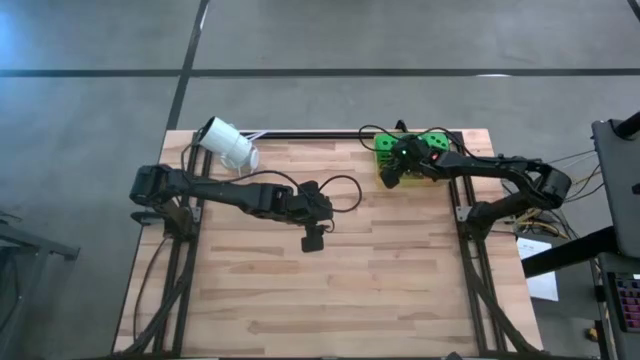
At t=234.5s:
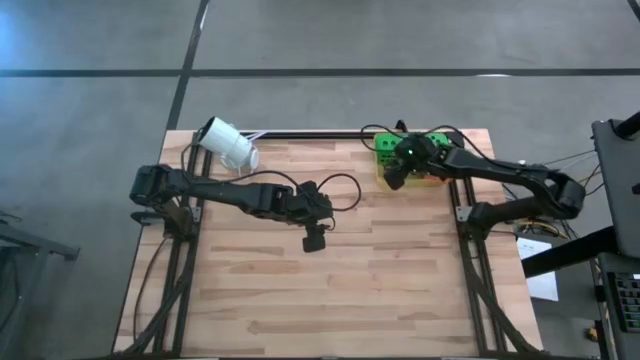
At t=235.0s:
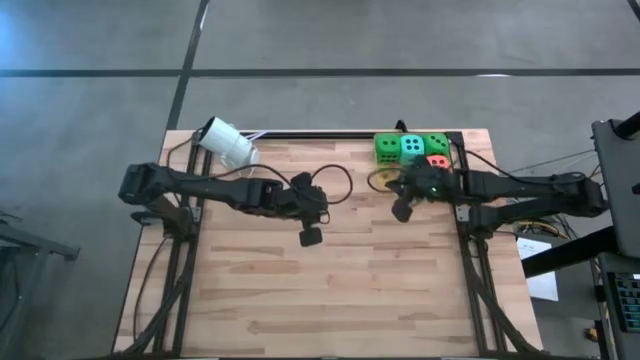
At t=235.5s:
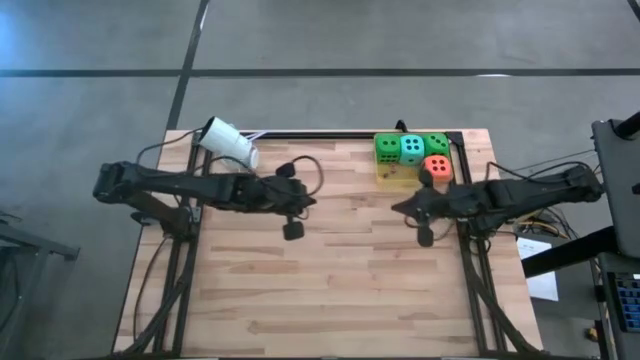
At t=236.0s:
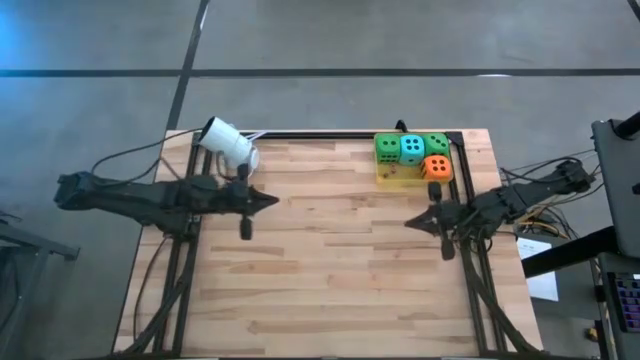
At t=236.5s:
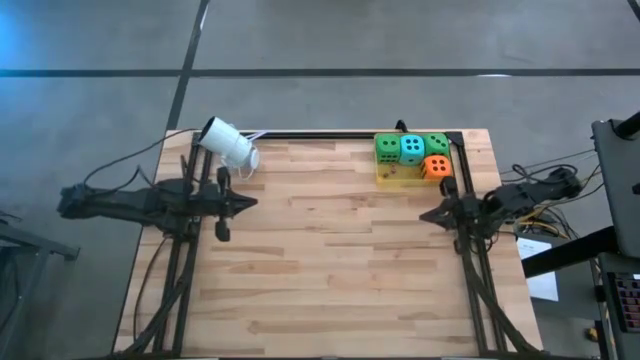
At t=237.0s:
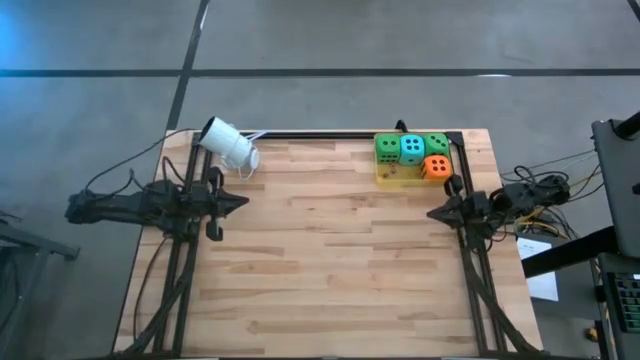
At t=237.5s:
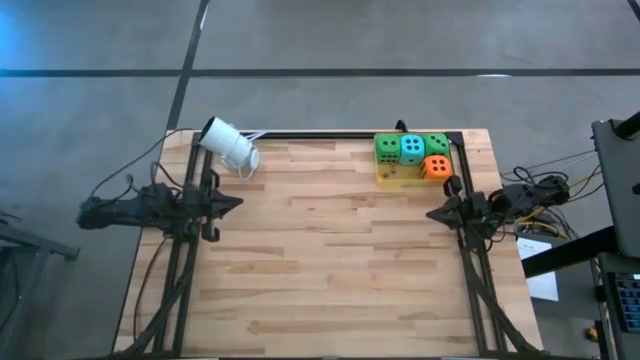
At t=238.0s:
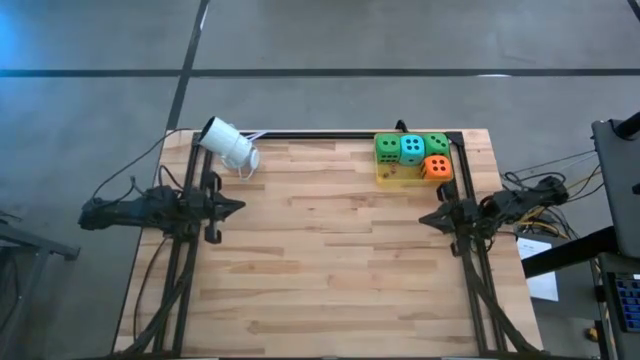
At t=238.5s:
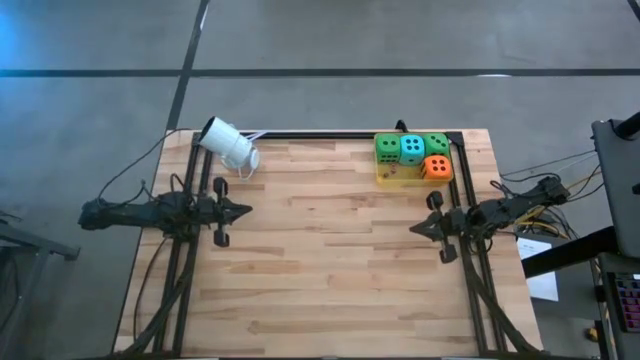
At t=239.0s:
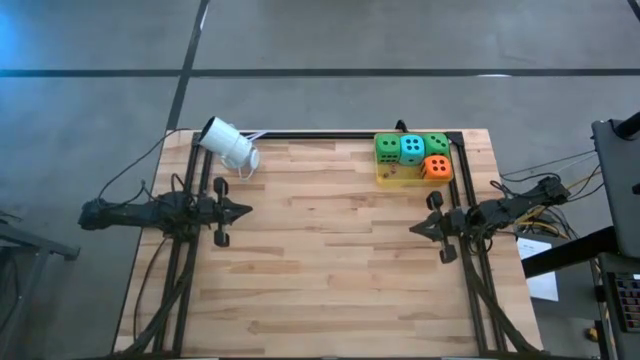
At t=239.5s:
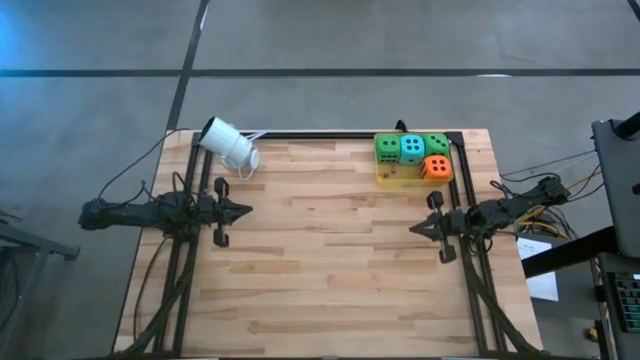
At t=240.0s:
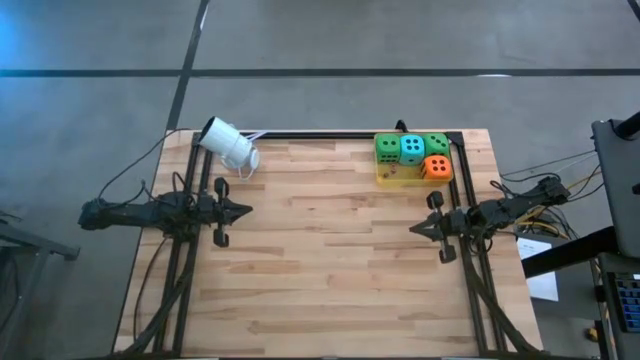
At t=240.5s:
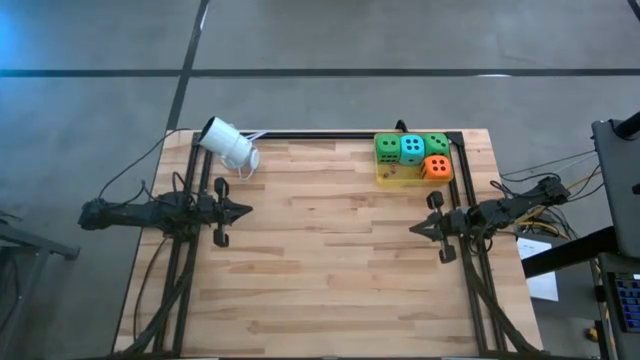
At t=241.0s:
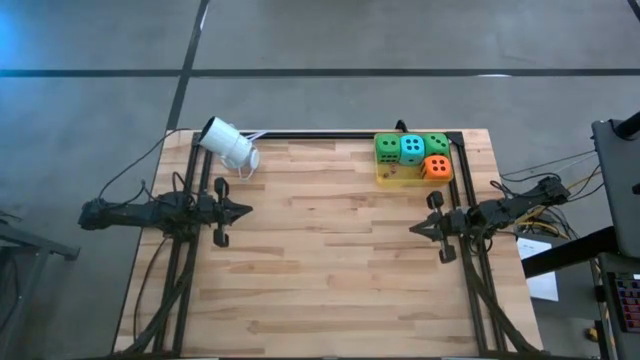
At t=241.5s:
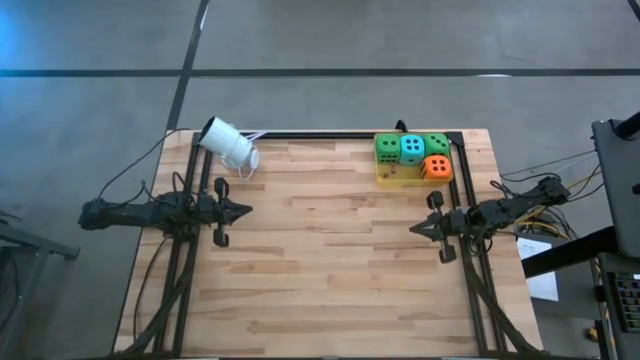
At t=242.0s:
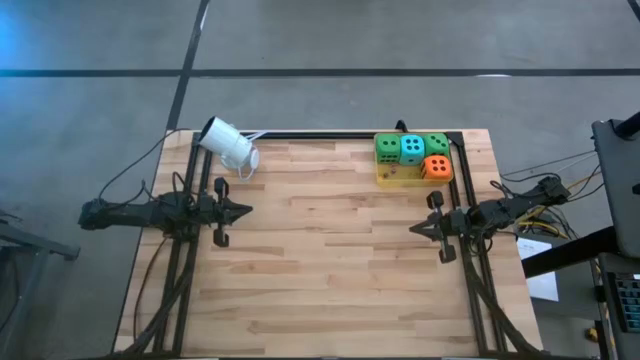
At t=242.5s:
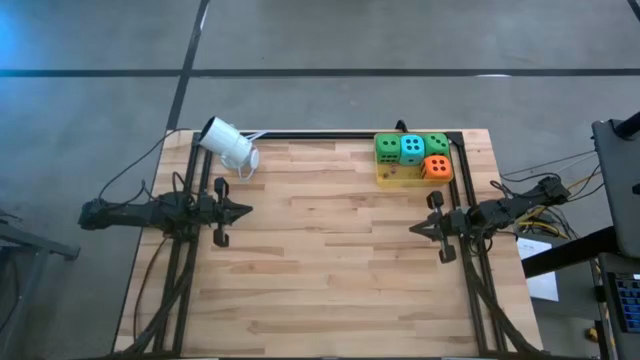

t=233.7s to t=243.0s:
Task: Pick & Place Dice
Return to Home Position

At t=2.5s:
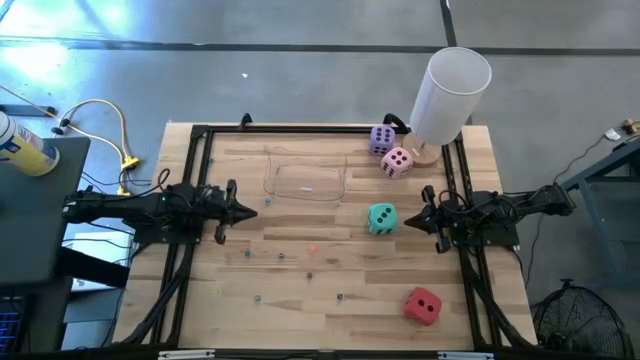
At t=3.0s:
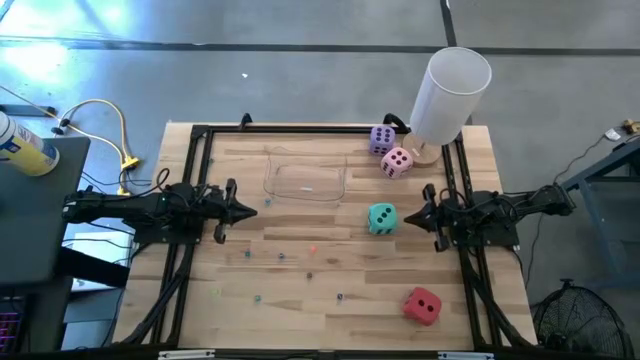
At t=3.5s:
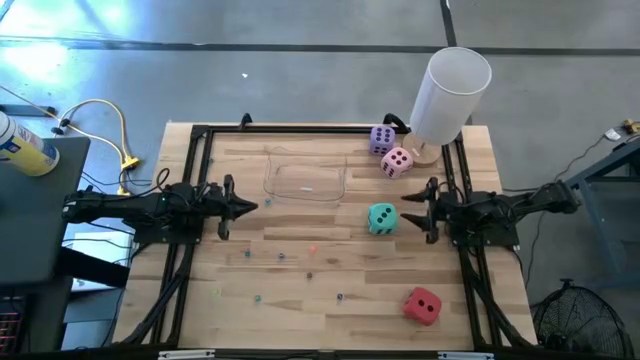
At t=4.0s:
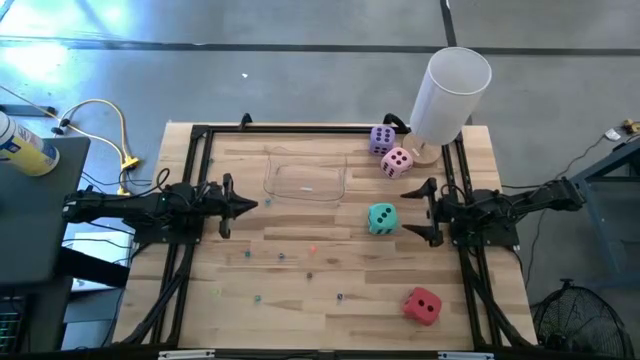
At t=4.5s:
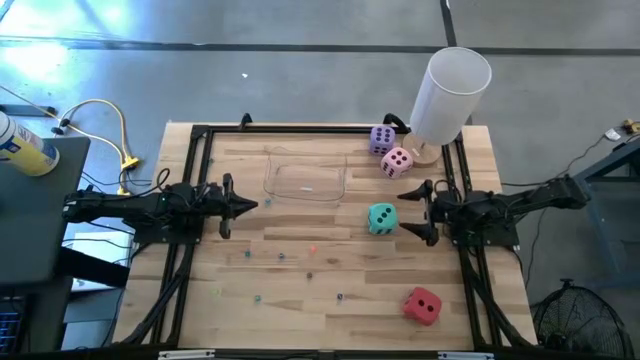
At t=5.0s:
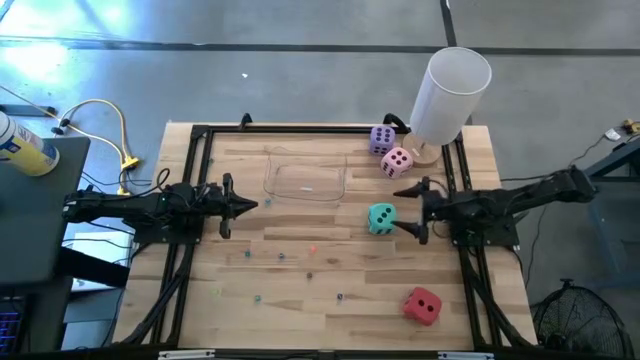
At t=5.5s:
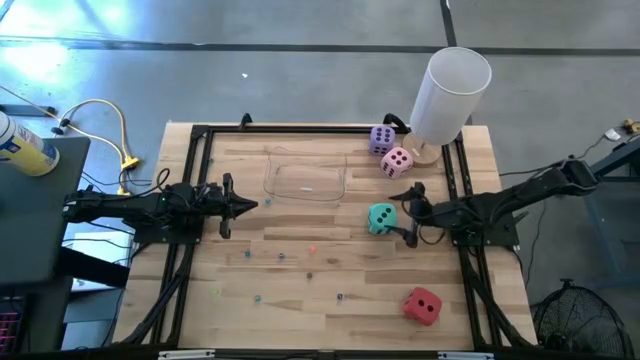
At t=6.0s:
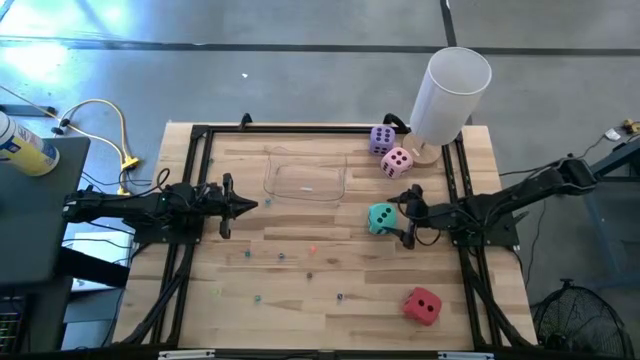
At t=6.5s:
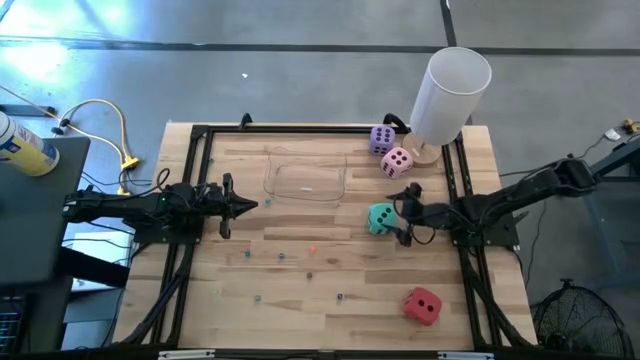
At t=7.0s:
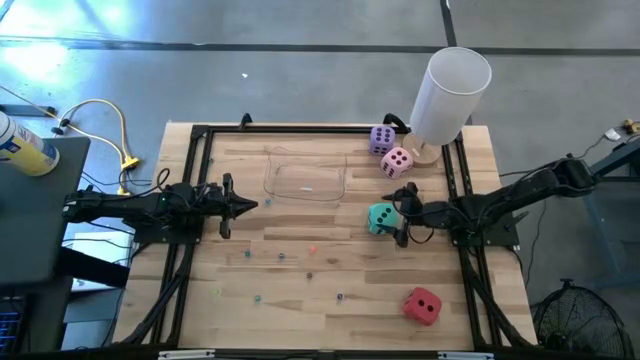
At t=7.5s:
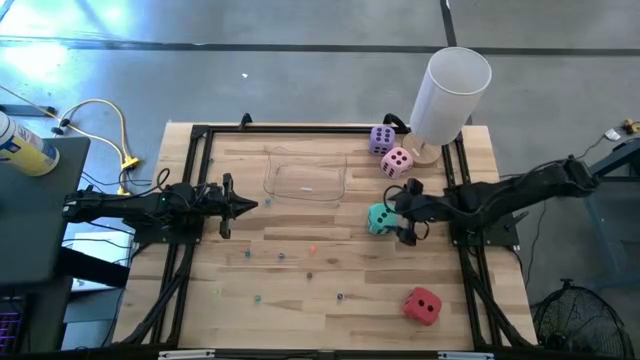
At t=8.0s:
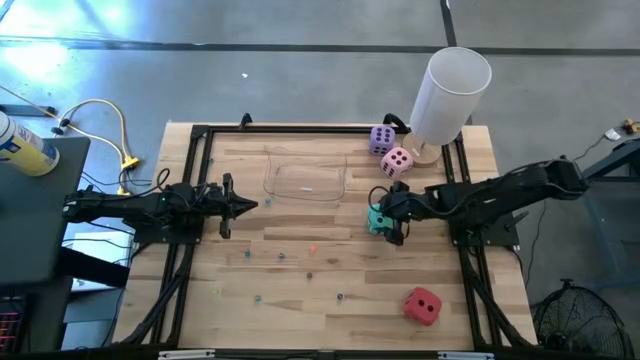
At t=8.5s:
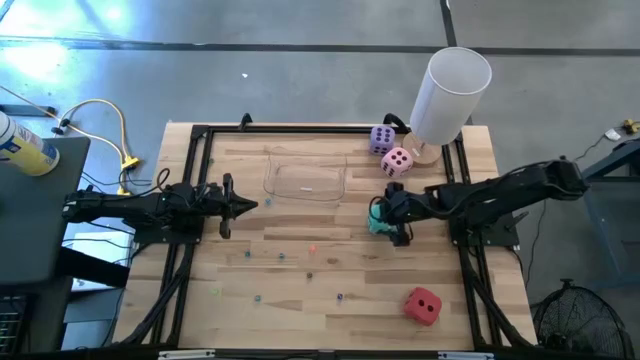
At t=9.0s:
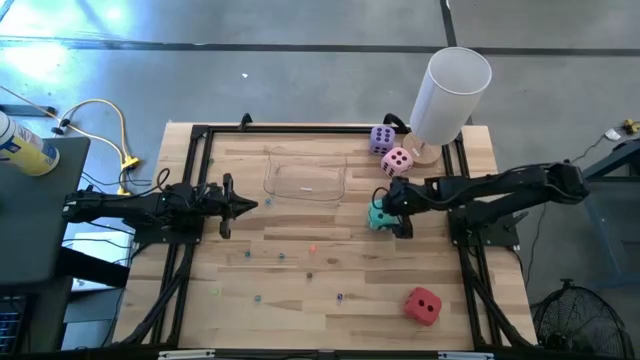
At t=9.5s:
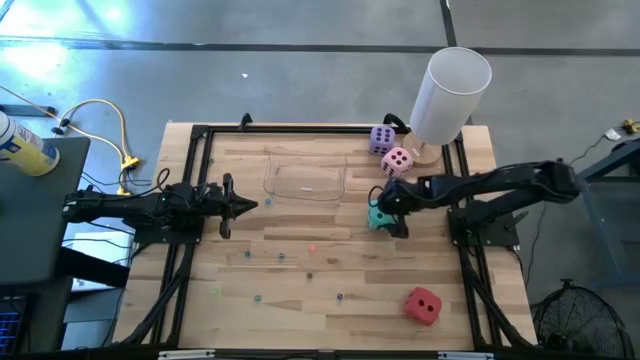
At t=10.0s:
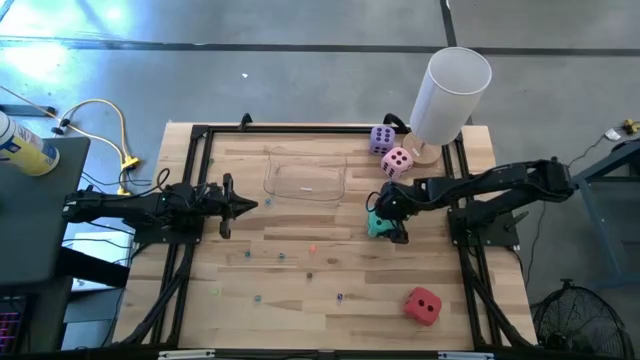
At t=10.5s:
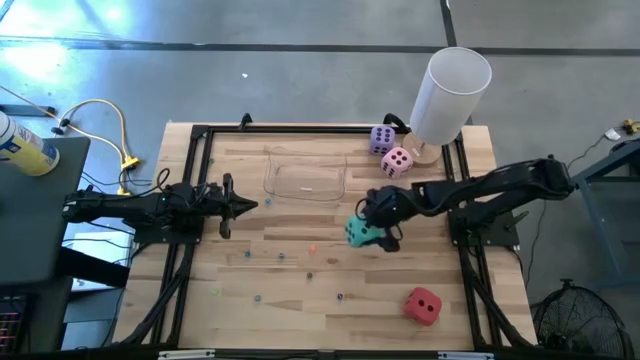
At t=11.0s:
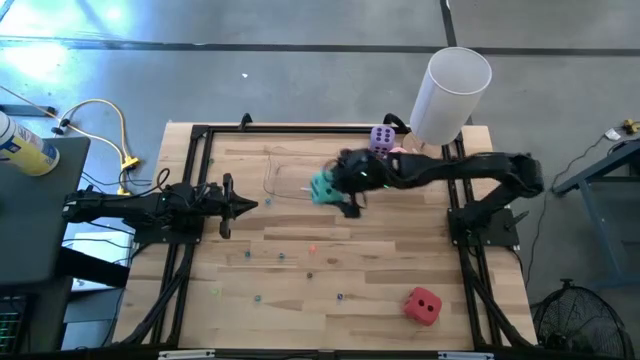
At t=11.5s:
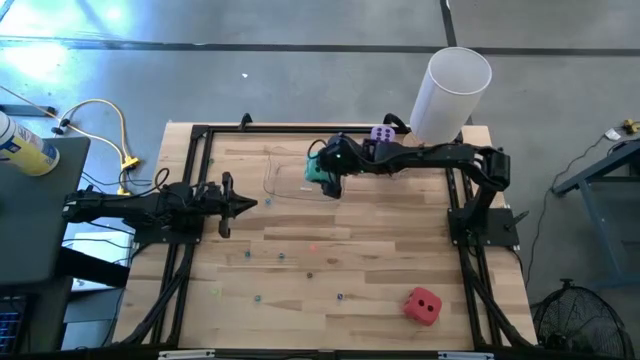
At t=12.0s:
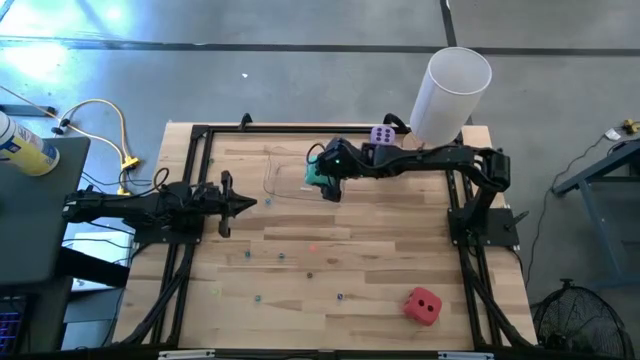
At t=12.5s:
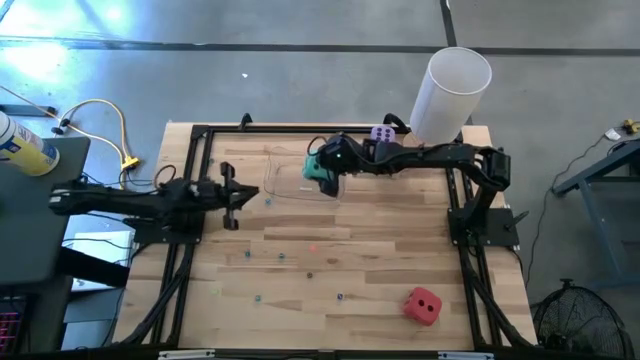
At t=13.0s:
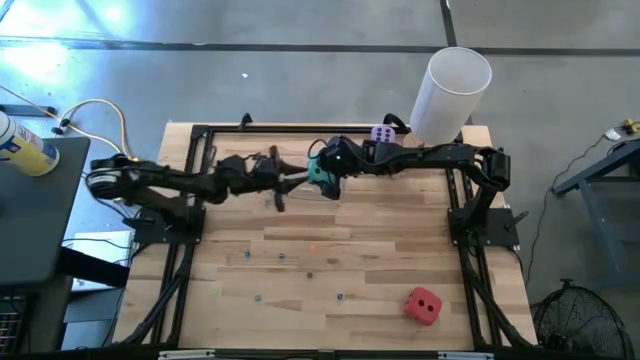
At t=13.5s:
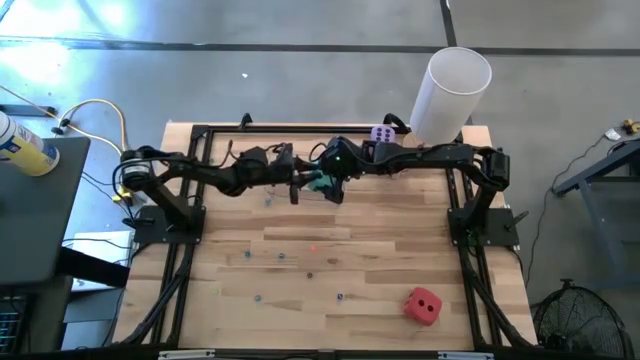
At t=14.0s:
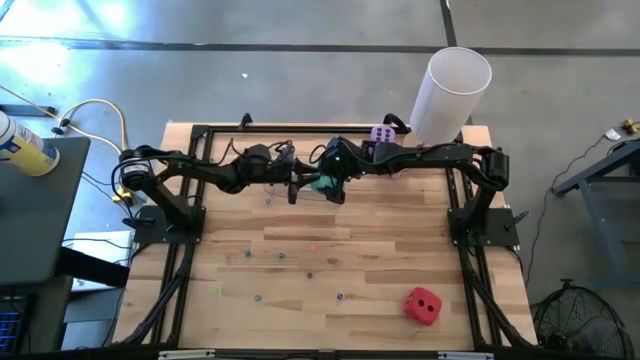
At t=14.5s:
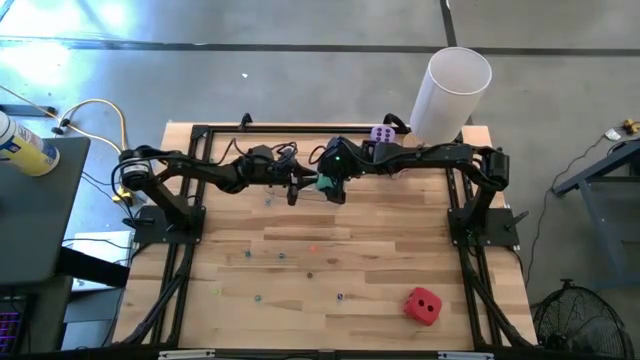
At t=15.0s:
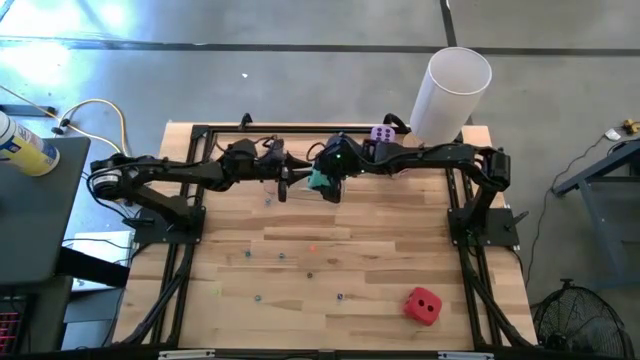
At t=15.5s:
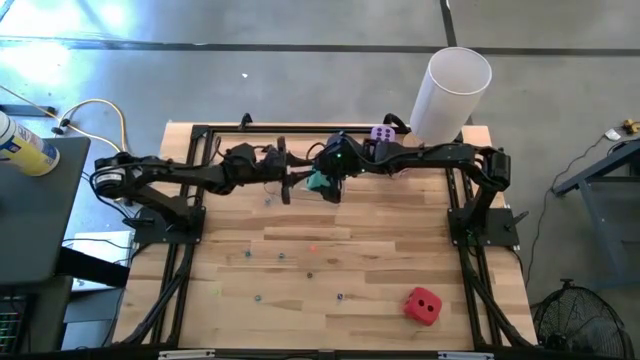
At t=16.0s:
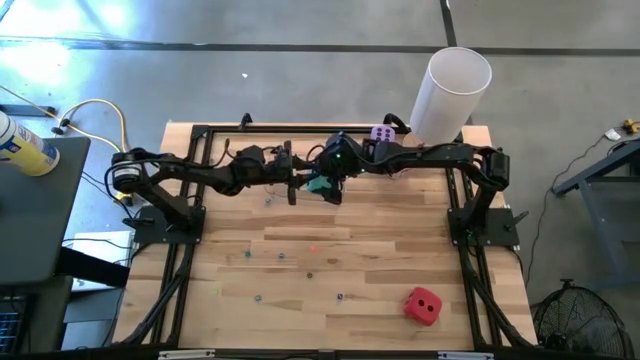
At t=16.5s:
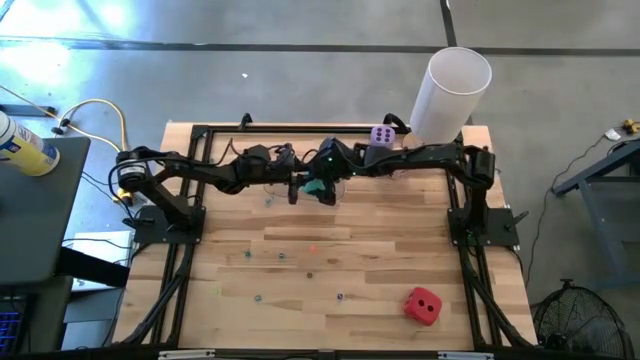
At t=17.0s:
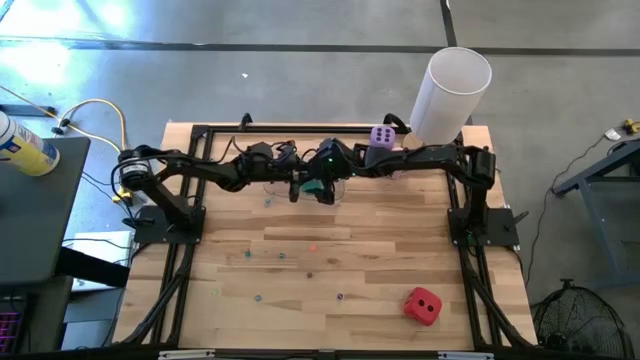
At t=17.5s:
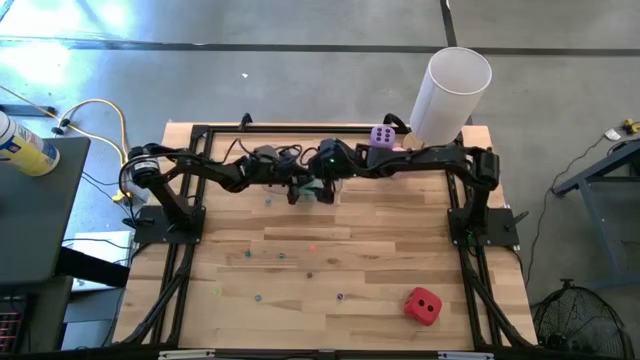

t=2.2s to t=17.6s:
Task: Pick & Place Dice
Put the large light blue dice into the transparent bin
